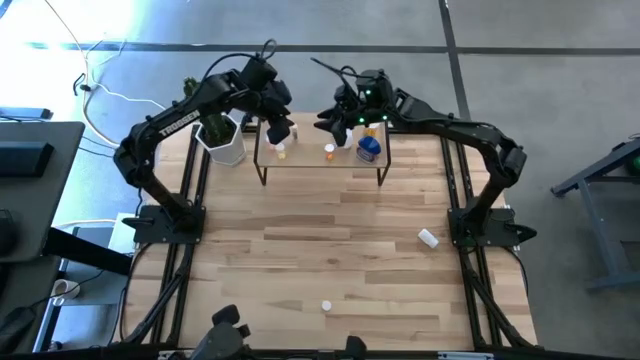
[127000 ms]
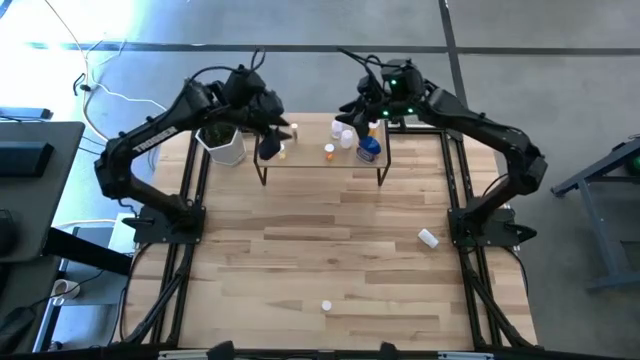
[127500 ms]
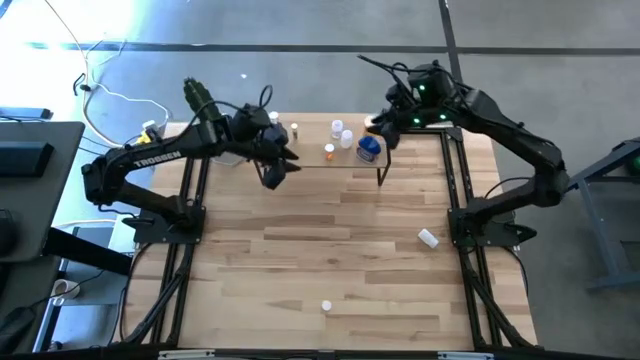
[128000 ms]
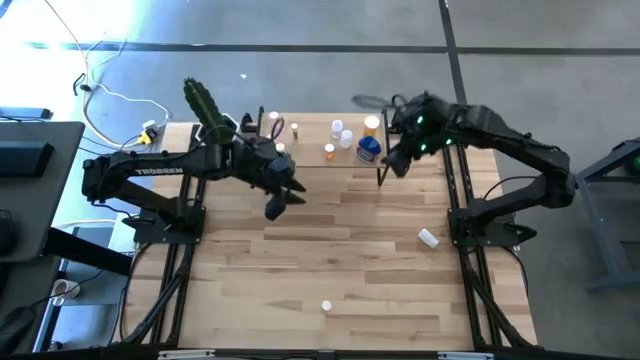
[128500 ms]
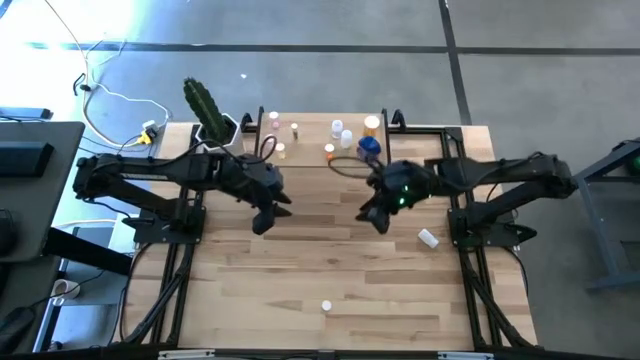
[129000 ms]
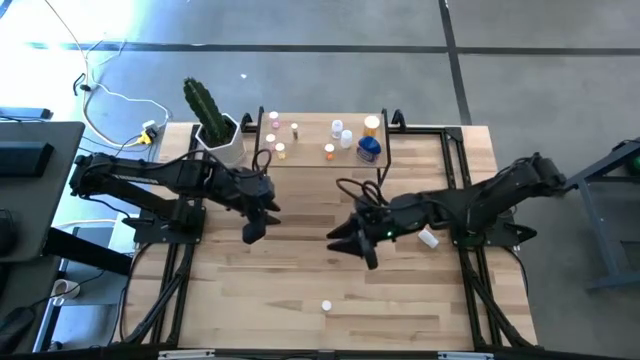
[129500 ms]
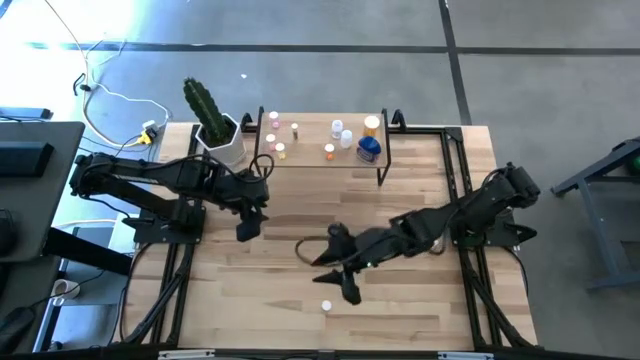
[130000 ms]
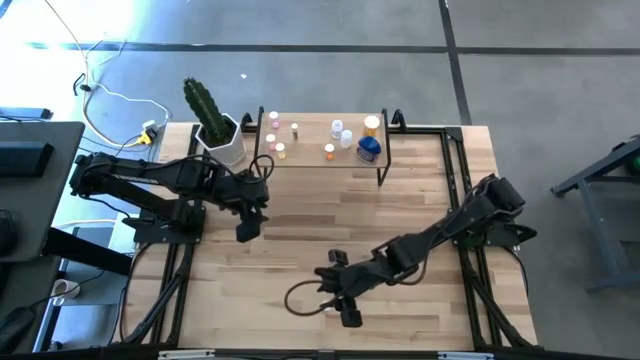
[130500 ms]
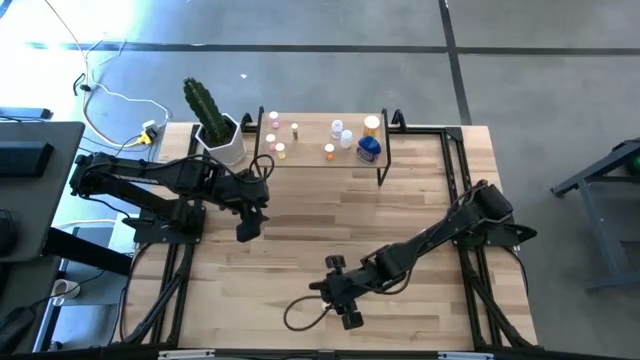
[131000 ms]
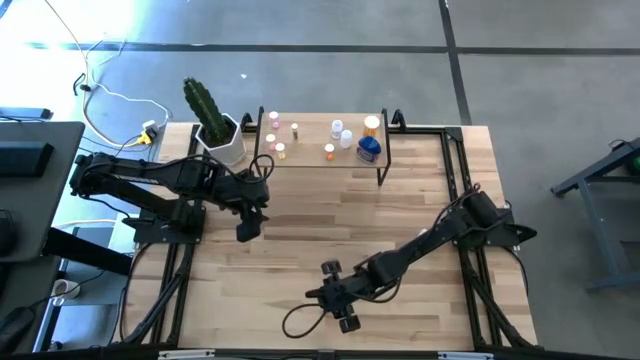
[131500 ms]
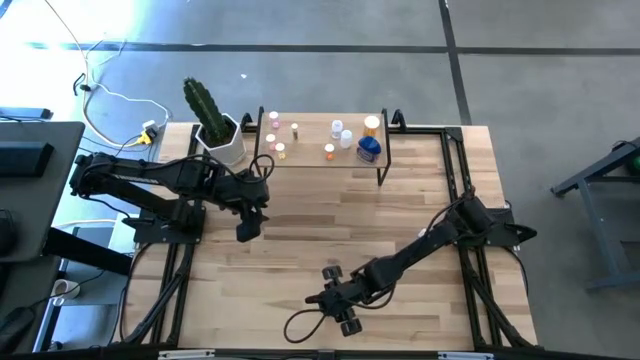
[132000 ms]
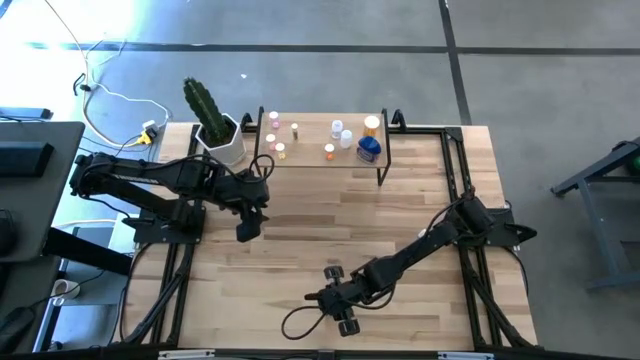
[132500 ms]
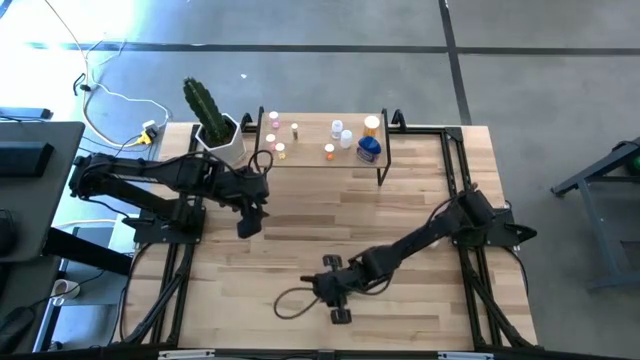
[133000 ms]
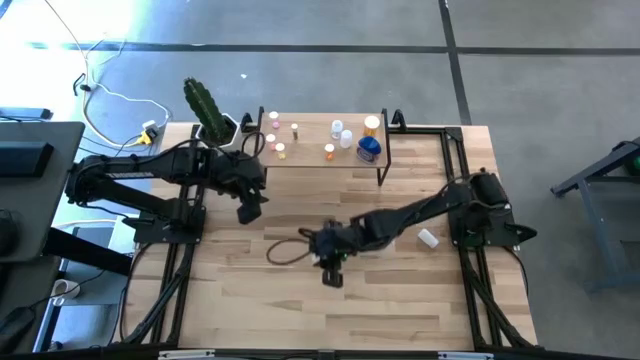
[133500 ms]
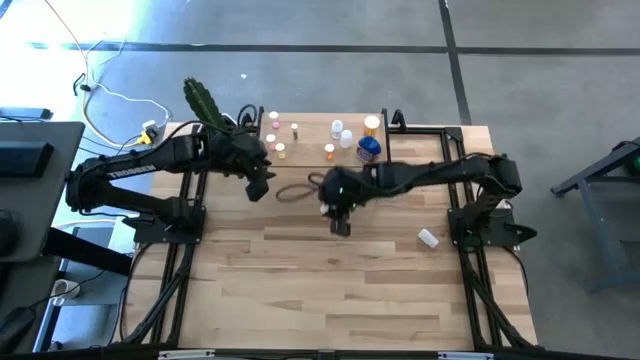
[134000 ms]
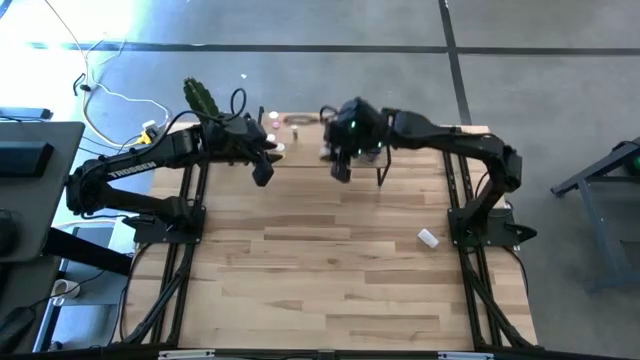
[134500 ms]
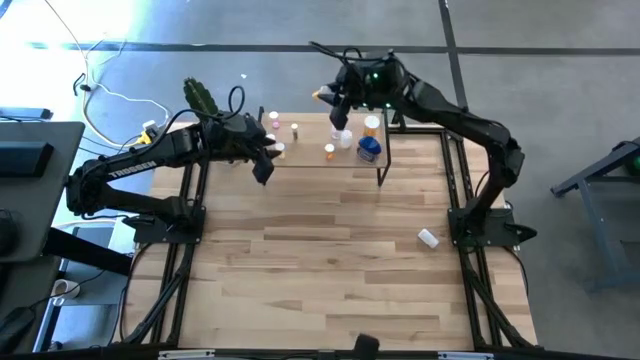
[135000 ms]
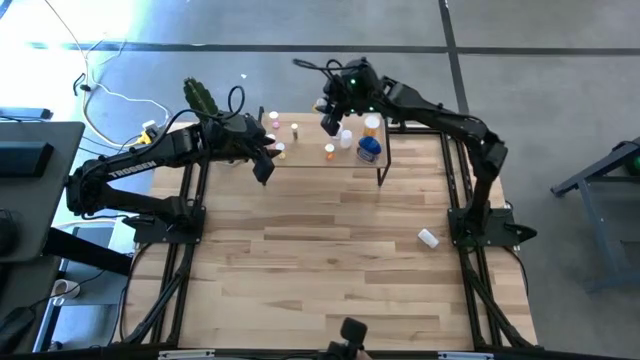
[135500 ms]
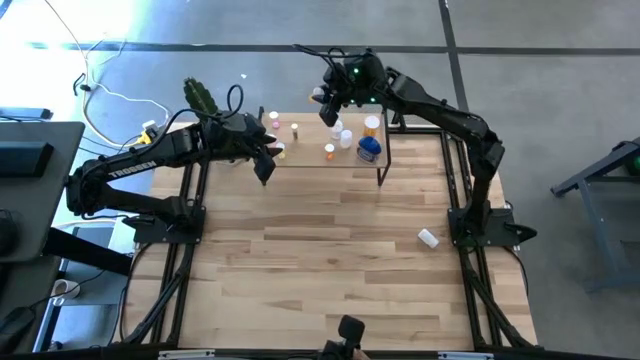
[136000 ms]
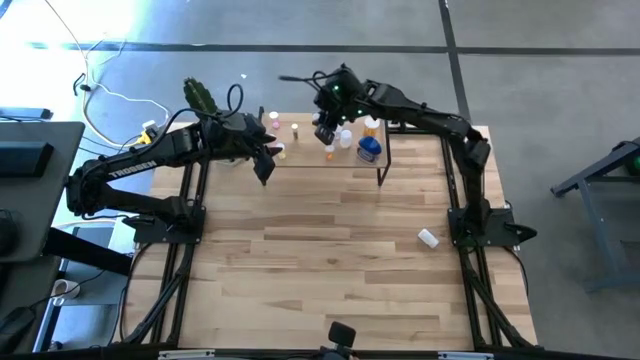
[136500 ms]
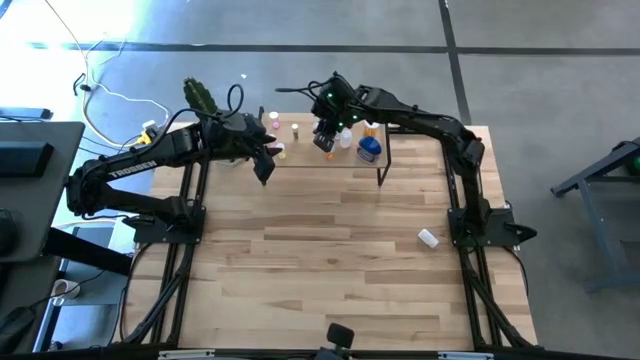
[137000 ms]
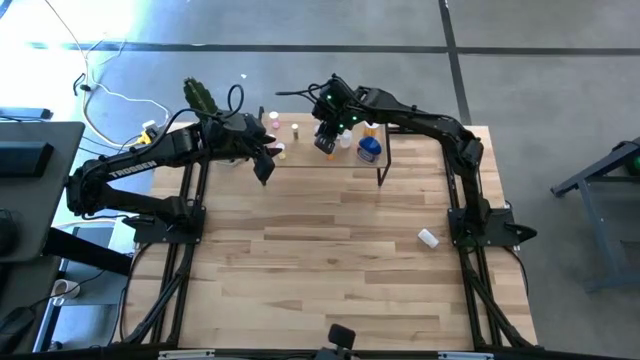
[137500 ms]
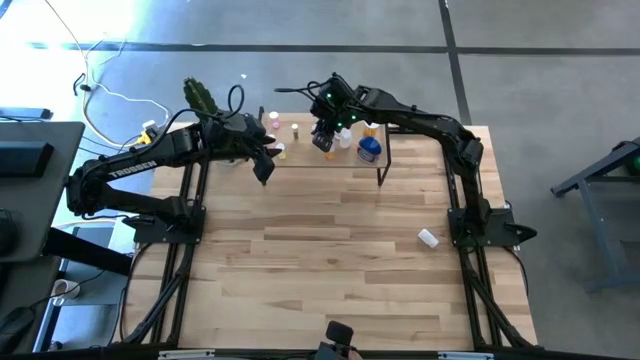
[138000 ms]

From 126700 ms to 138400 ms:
Task: Pick and place medicine bottles onto shelf by color
Put the orange pill bottle on the shelf

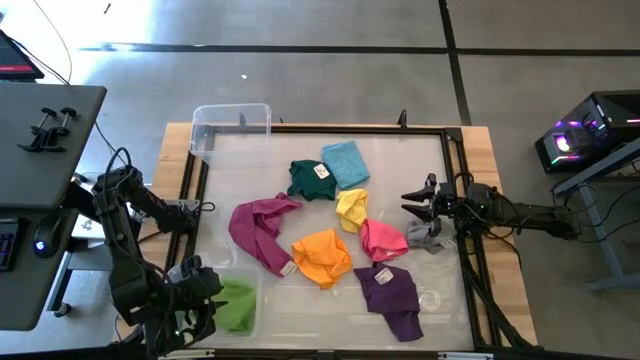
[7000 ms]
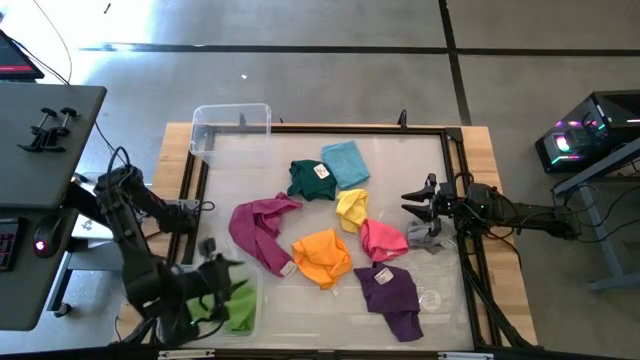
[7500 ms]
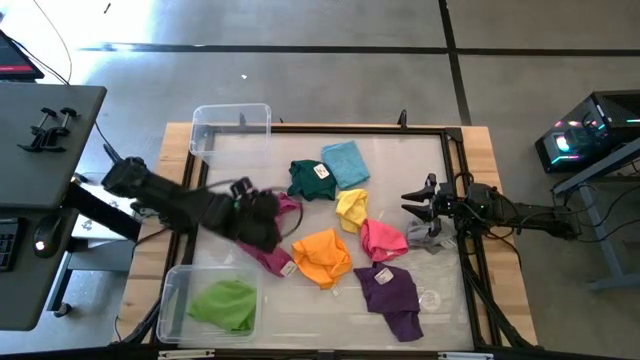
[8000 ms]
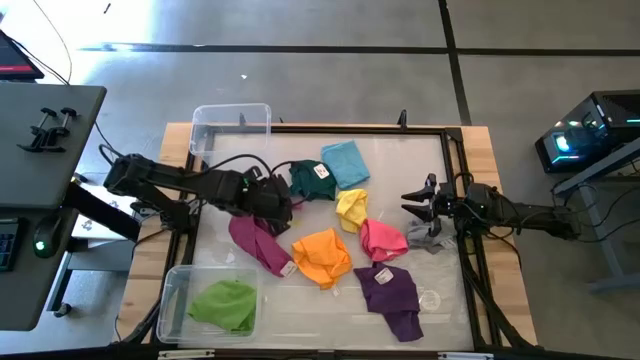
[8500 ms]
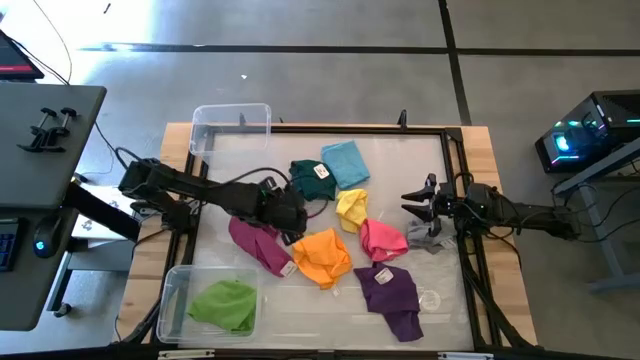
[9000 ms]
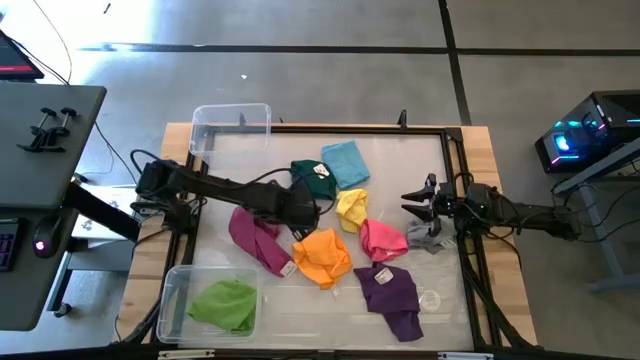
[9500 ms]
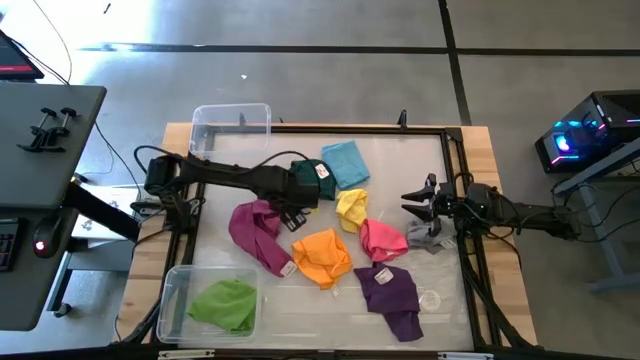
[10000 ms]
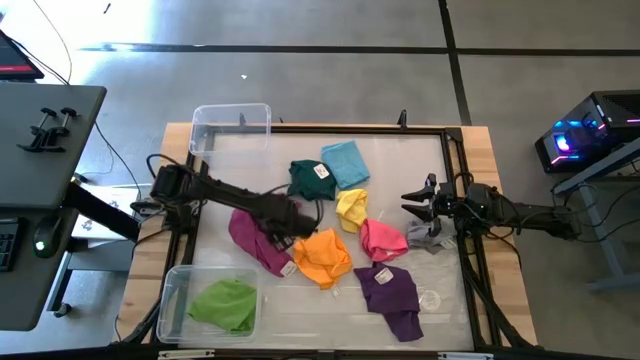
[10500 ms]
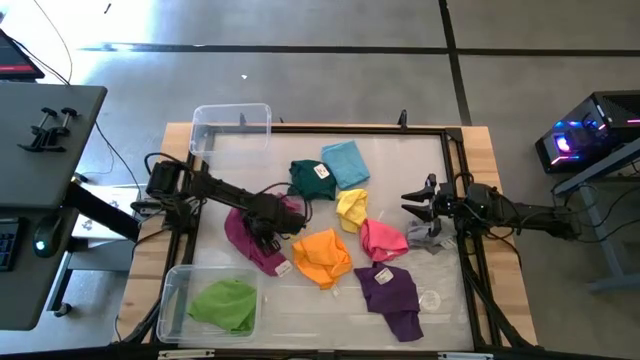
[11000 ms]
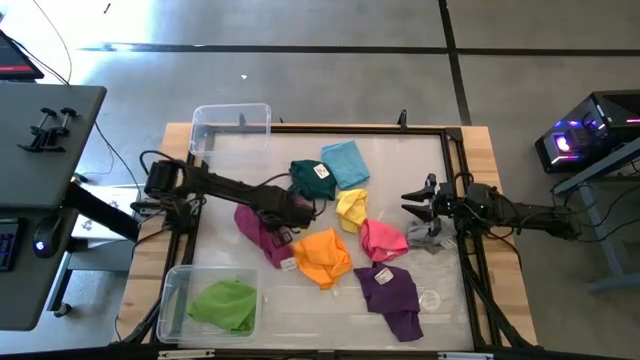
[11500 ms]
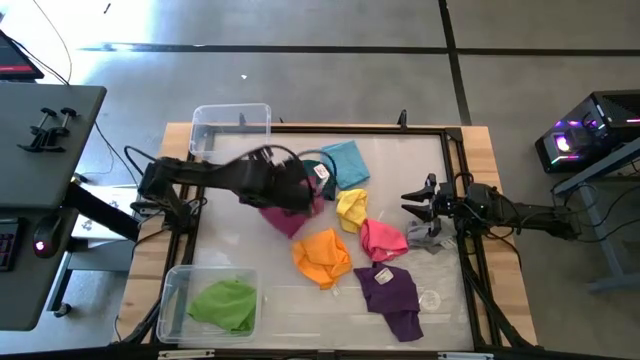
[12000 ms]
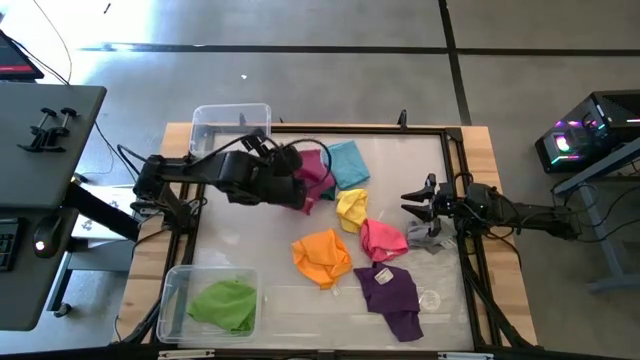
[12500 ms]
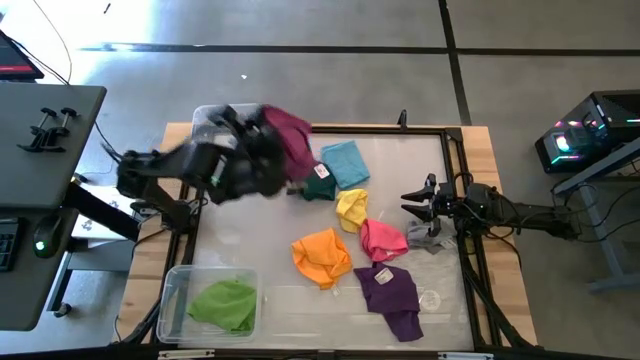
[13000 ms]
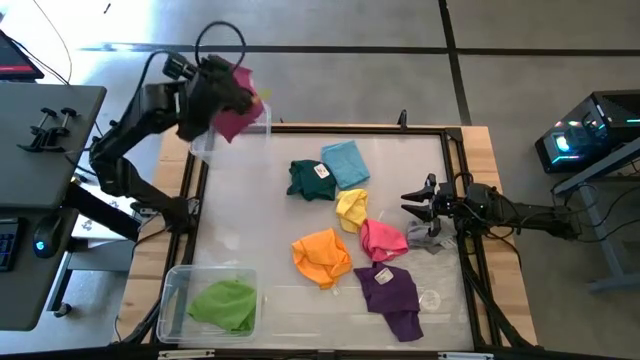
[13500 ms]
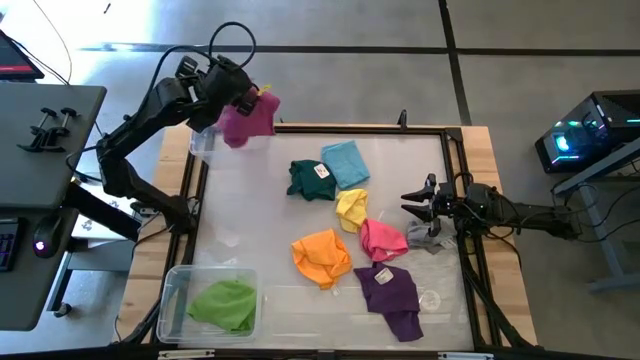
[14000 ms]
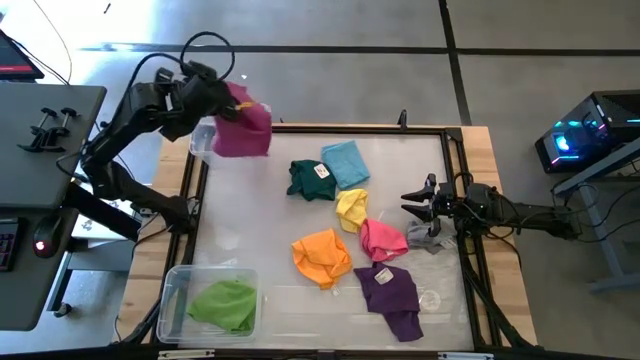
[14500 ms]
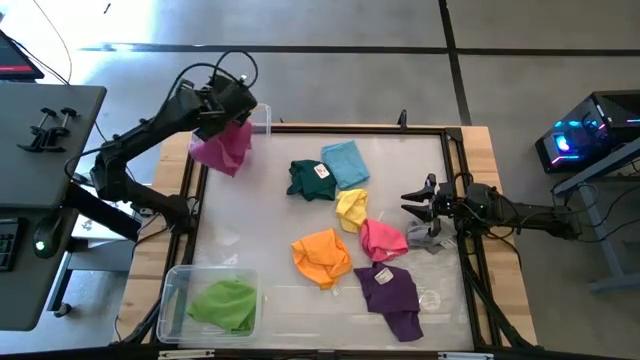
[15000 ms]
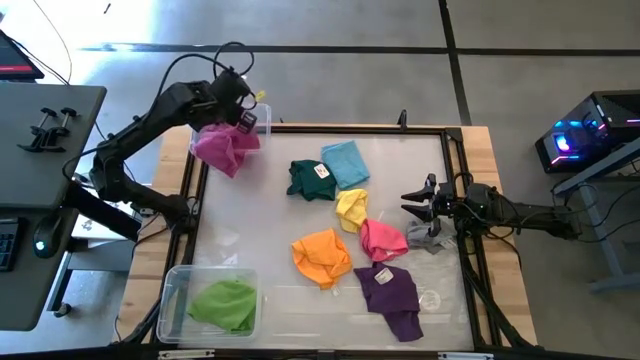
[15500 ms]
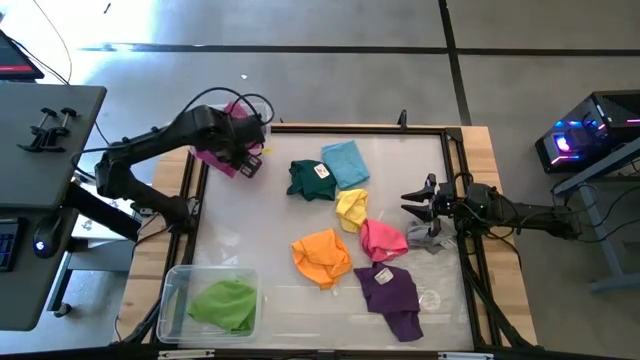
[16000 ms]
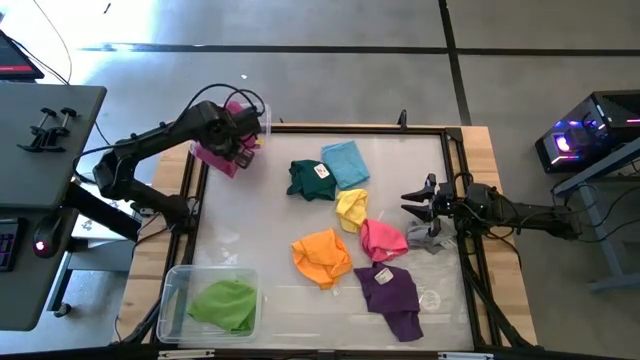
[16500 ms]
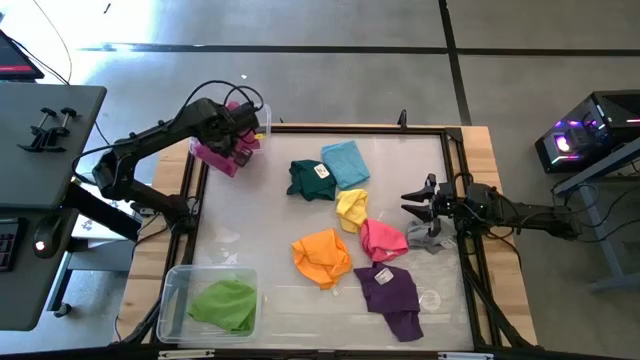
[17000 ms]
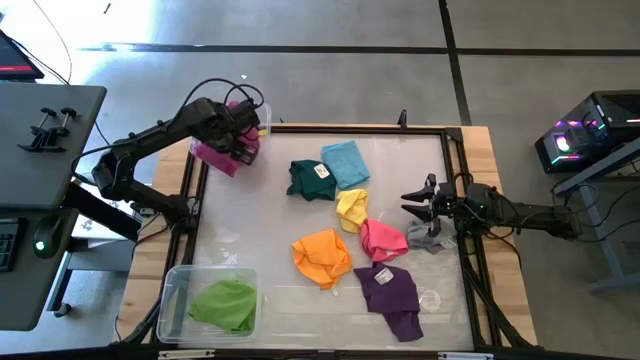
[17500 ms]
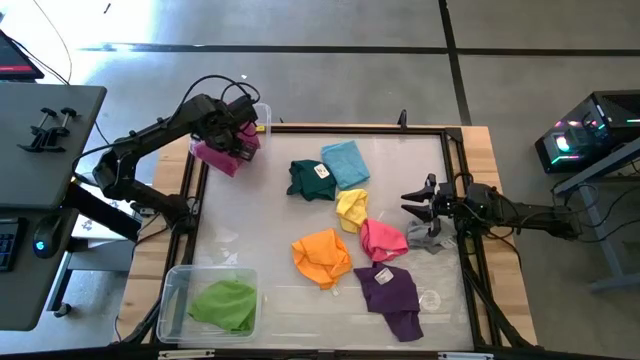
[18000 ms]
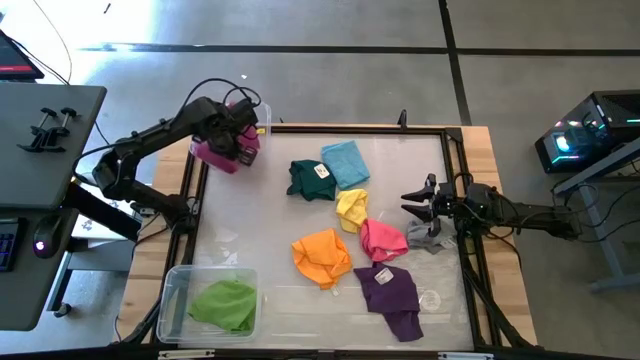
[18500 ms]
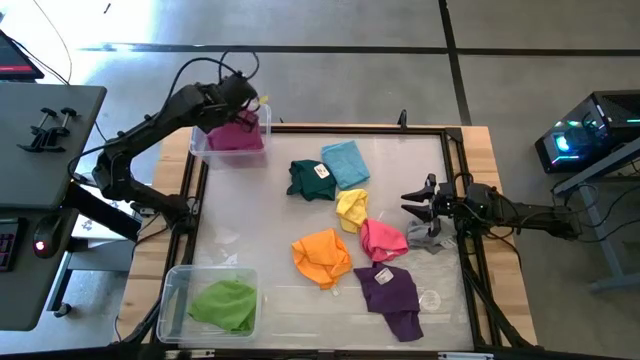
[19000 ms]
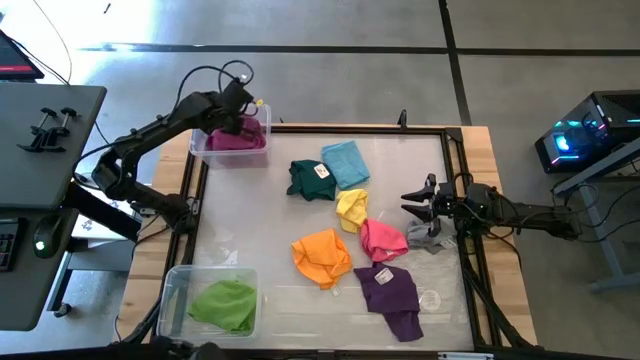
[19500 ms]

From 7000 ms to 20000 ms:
Task: Sort towels by color in basket
Put the dark pink towel into the top transparent bin
